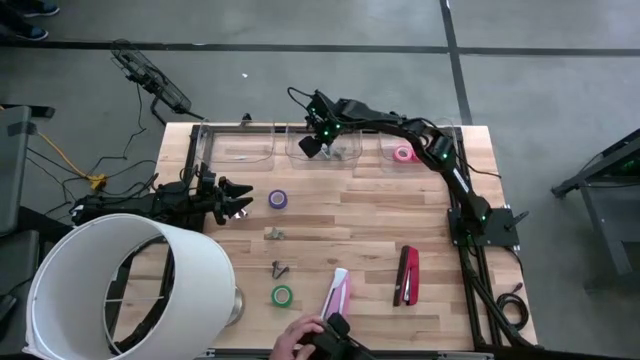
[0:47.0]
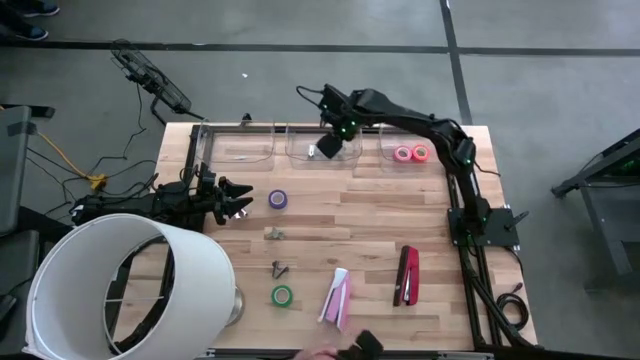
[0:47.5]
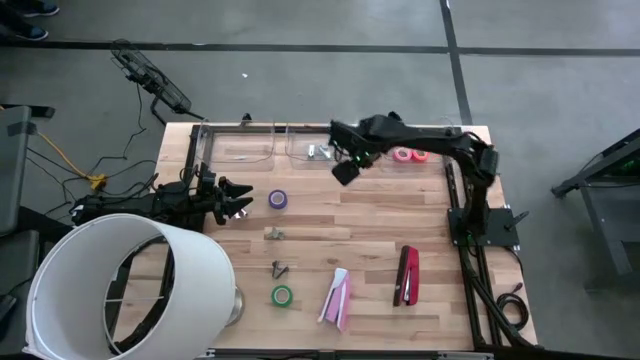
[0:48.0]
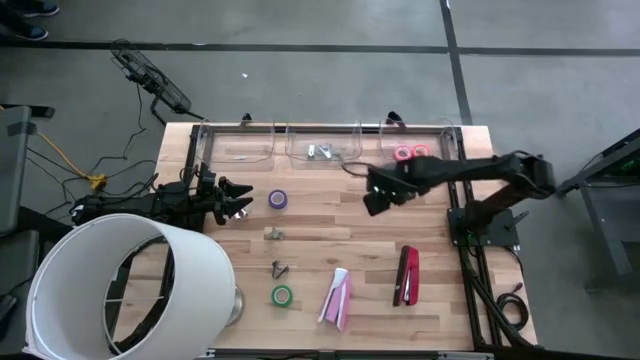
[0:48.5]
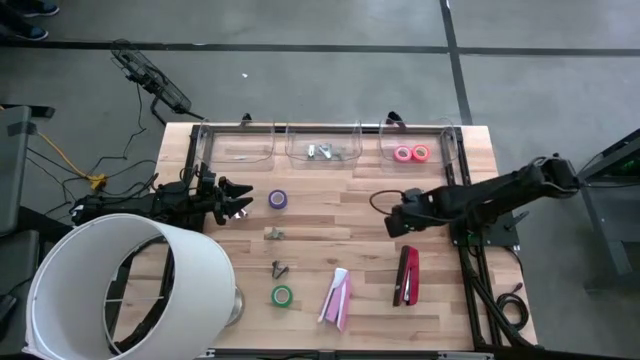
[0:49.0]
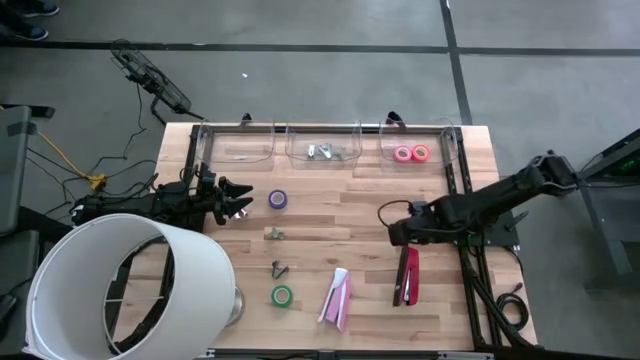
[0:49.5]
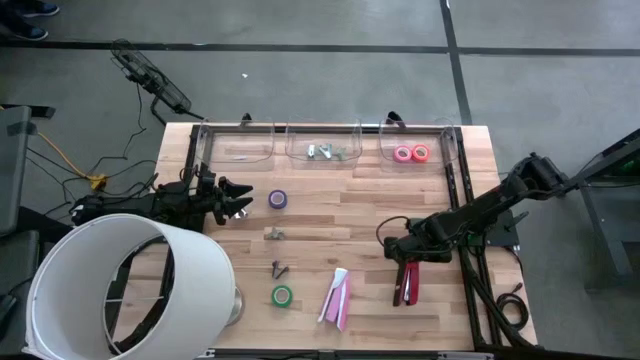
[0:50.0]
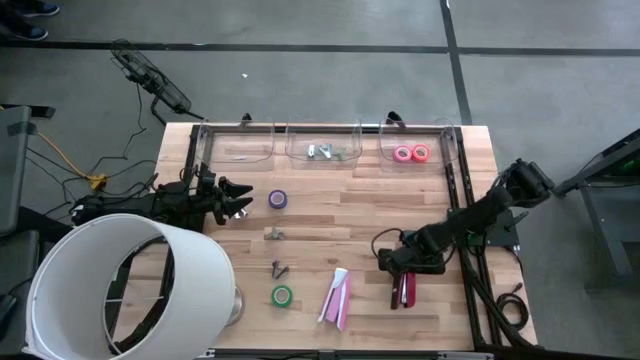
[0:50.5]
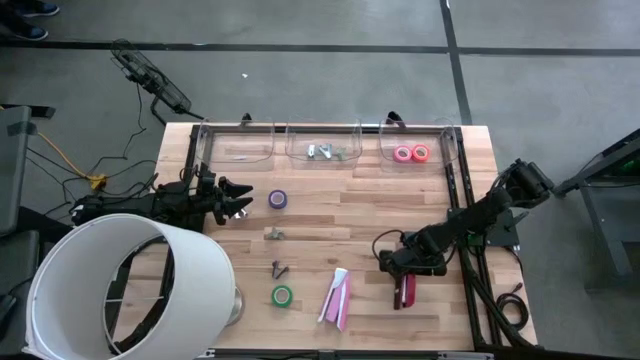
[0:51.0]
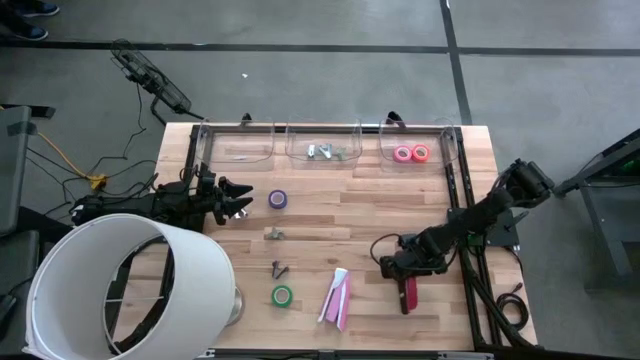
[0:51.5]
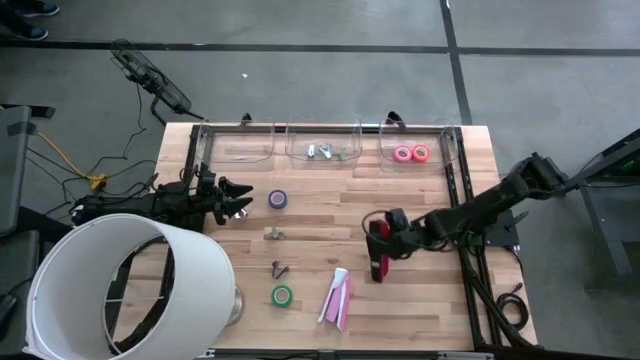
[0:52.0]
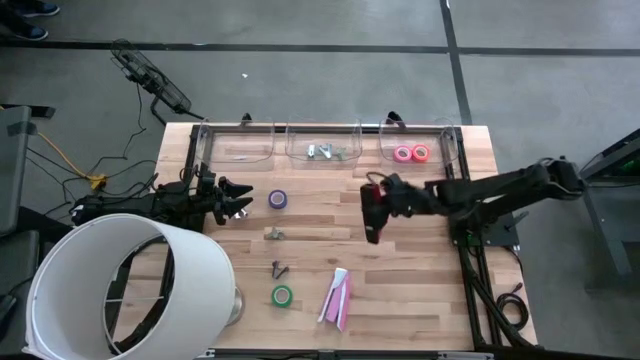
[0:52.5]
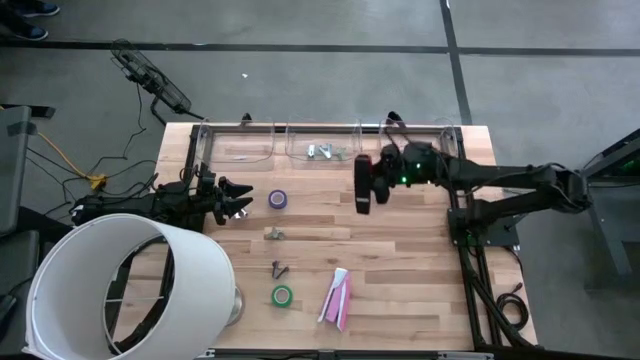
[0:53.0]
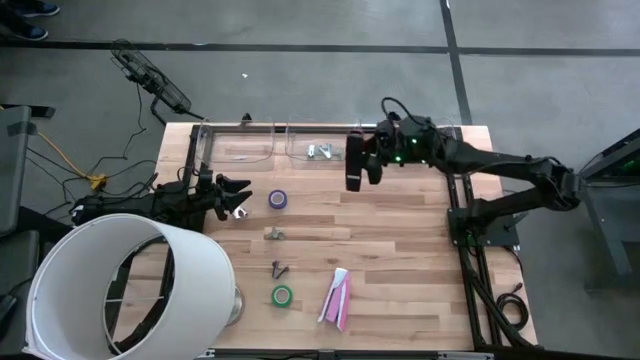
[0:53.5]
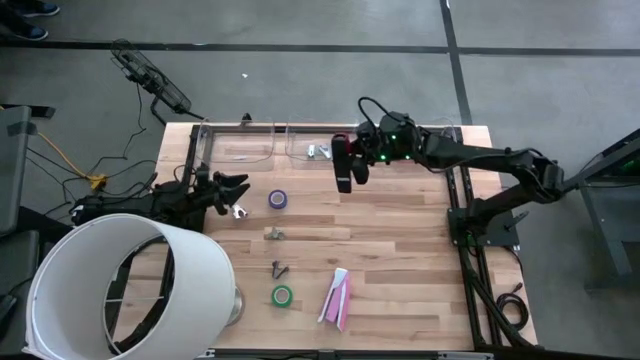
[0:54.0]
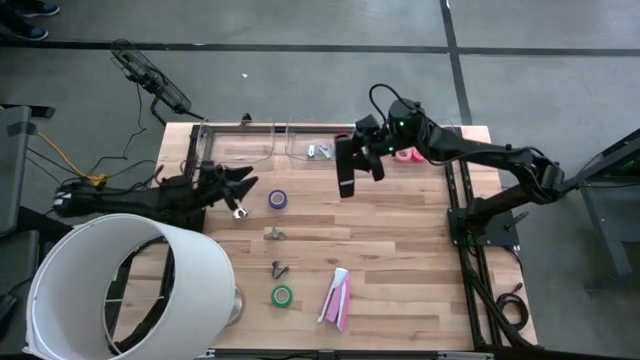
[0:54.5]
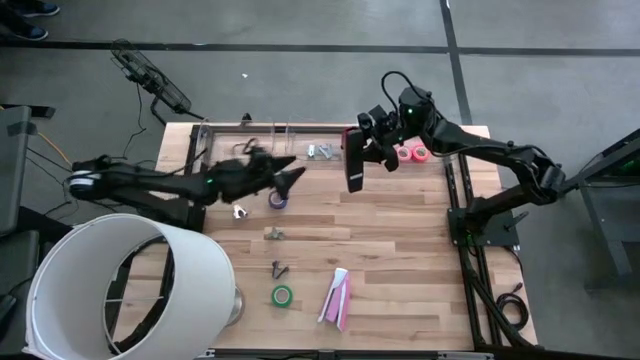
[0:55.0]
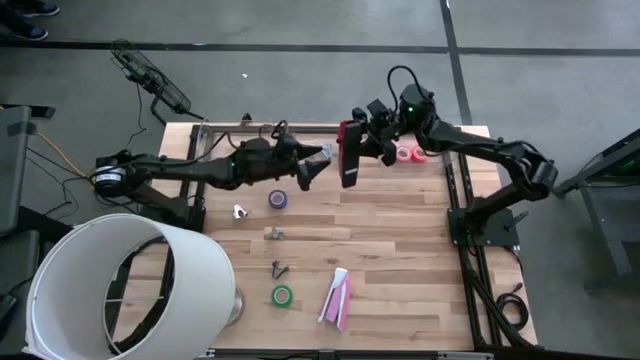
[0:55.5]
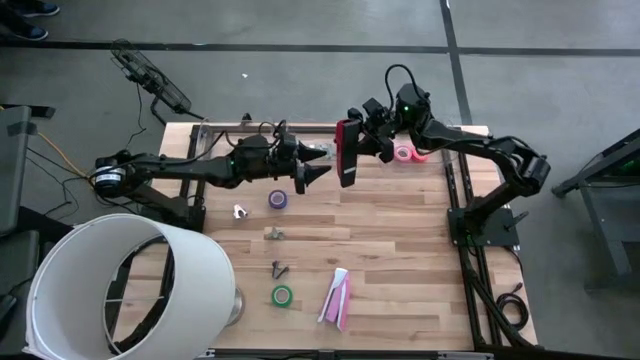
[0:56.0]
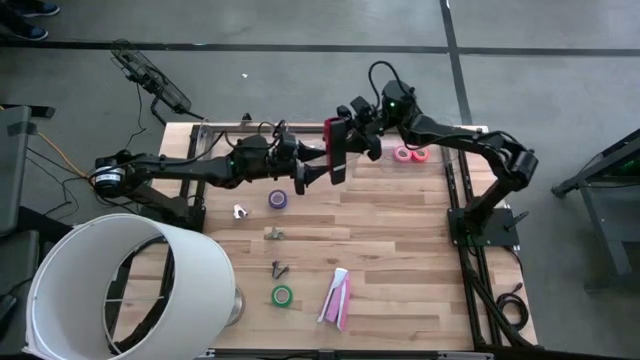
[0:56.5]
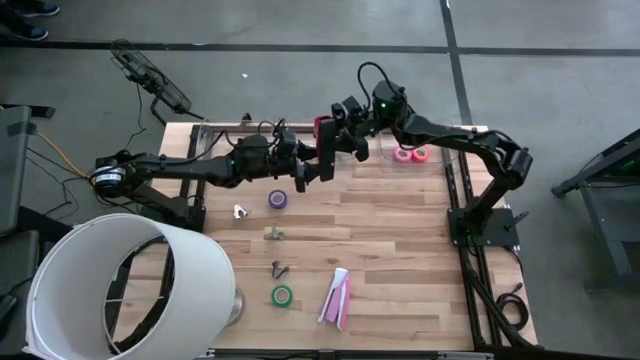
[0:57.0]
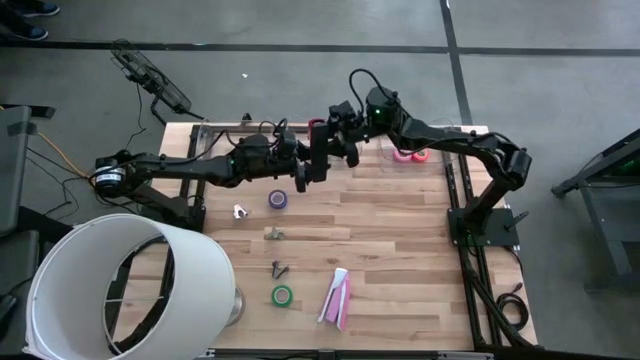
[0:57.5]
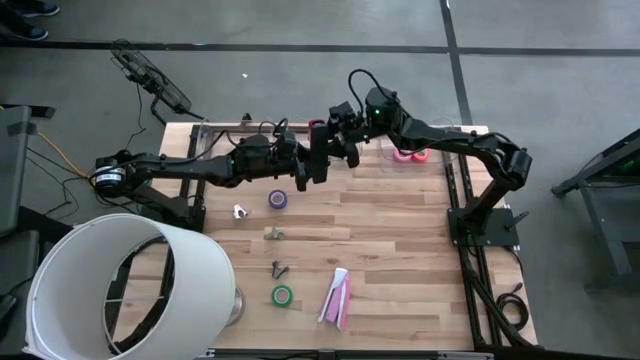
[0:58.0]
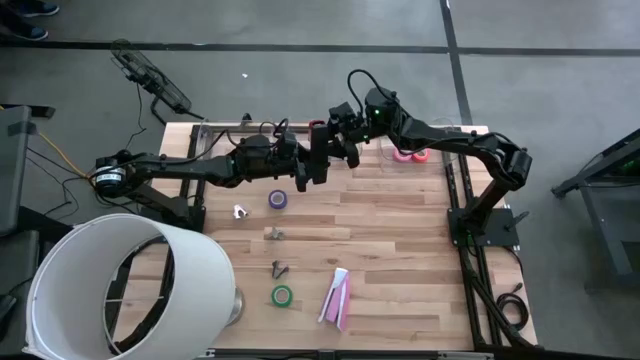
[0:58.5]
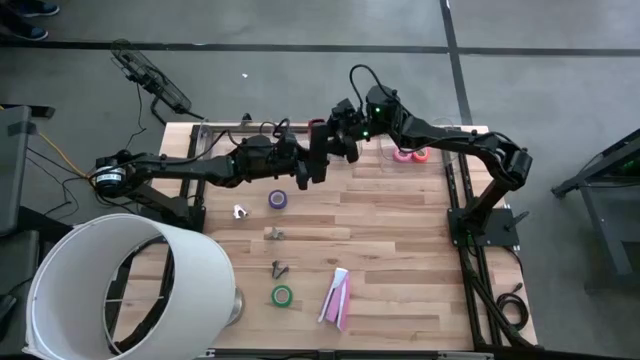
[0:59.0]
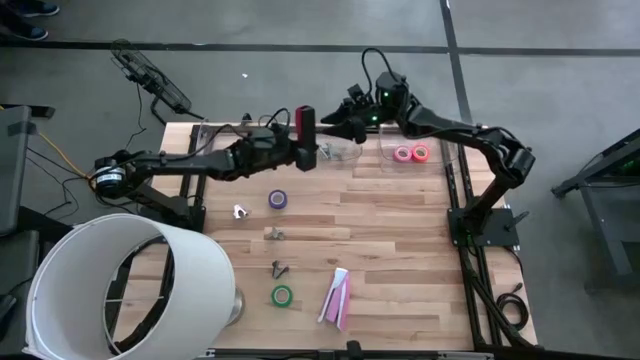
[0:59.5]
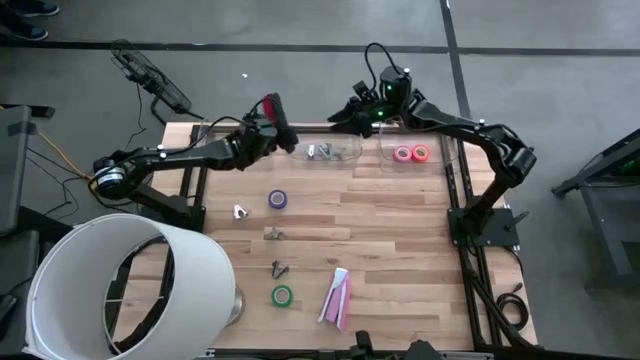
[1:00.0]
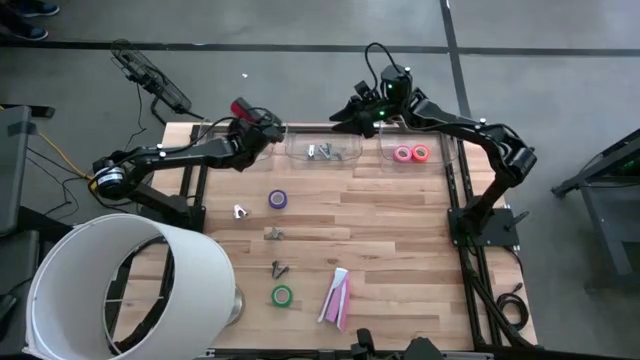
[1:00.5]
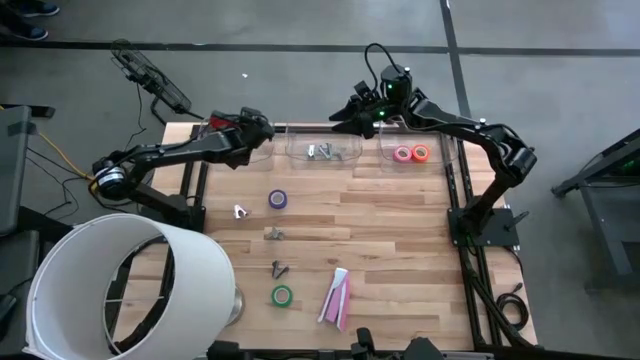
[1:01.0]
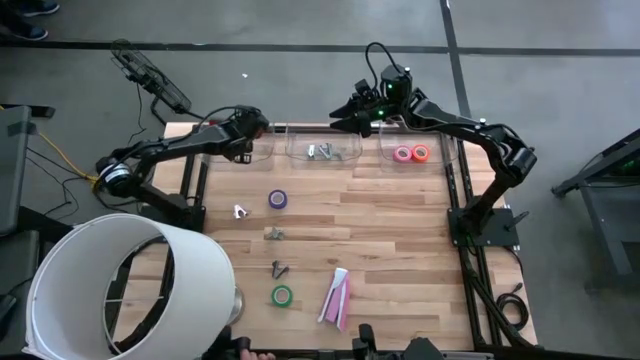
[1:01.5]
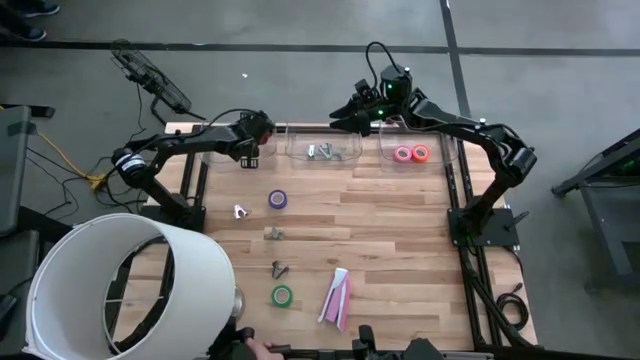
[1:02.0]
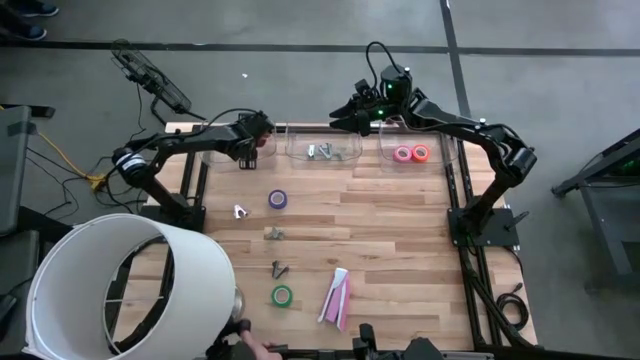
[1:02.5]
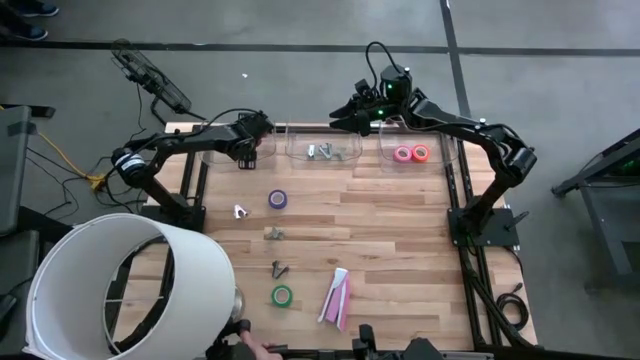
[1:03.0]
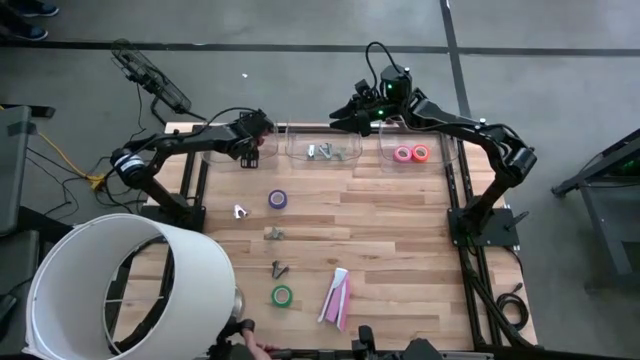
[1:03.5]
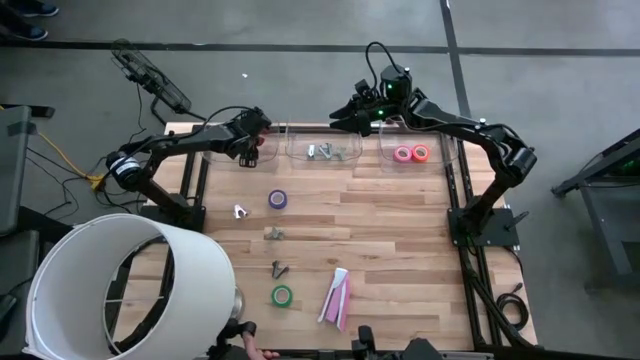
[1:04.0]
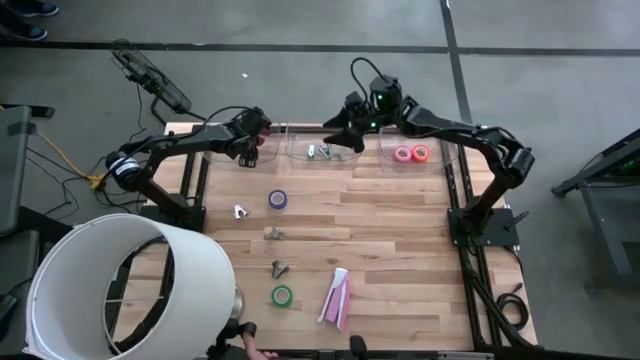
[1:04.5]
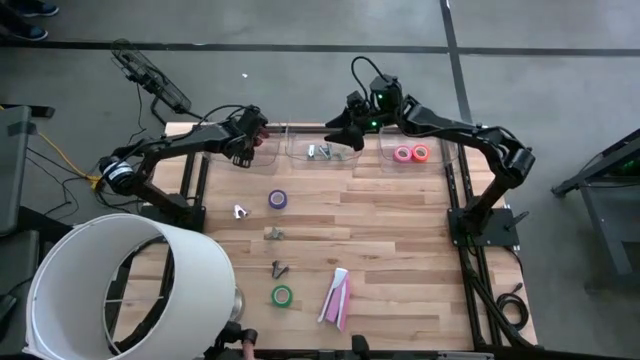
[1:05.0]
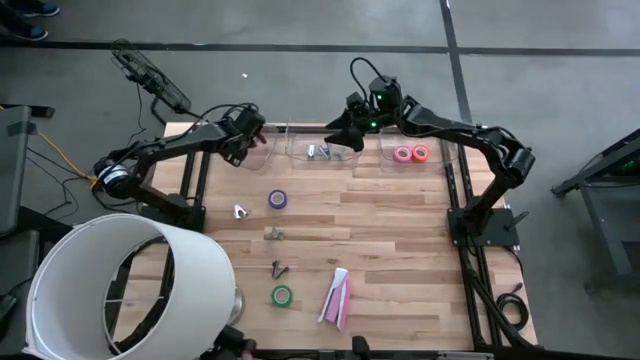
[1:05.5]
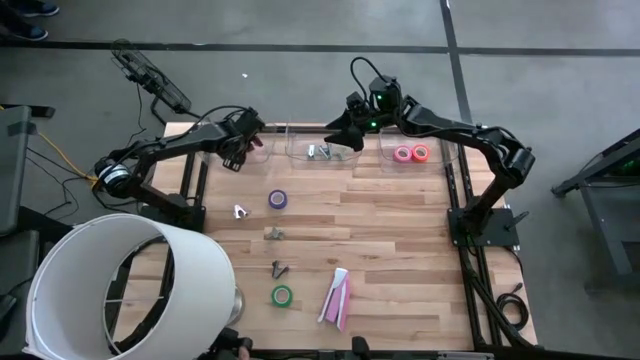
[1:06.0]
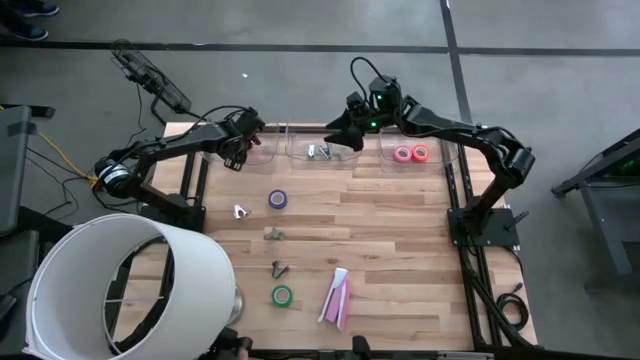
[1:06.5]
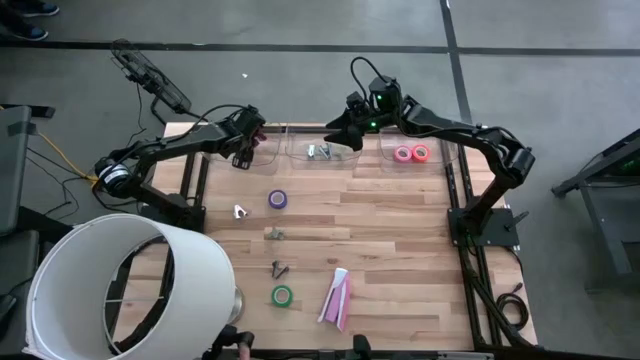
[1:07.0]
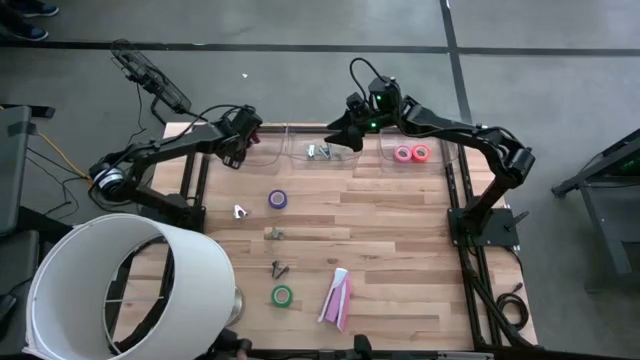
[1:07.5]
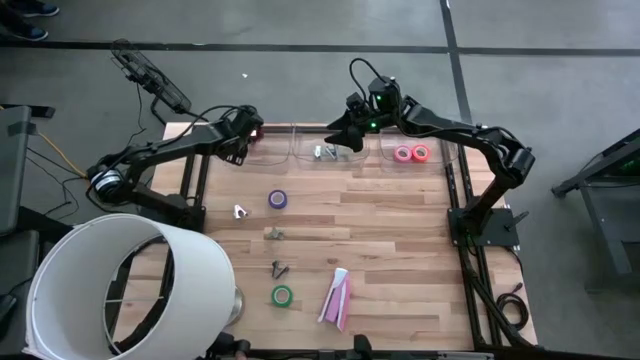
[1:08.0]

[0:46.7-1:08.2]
Task: Pick and place Stapler, Stapler remover, tape
Put the red stapler into the left transparent bin
